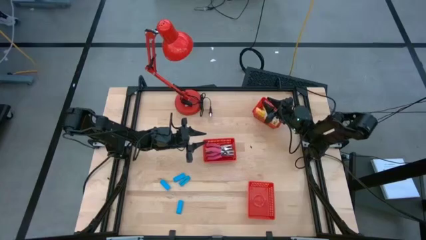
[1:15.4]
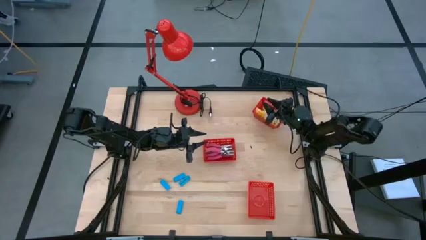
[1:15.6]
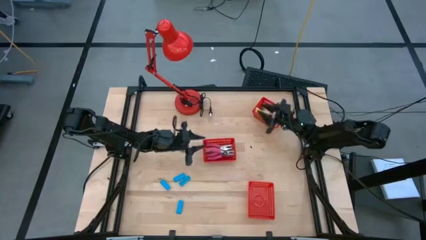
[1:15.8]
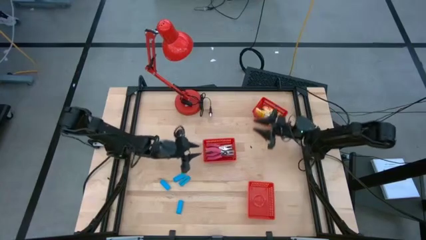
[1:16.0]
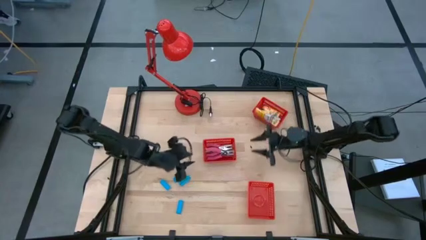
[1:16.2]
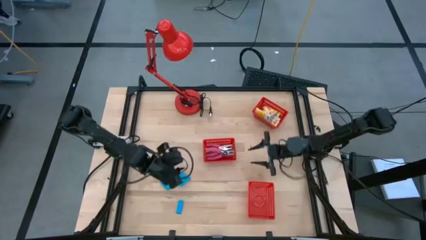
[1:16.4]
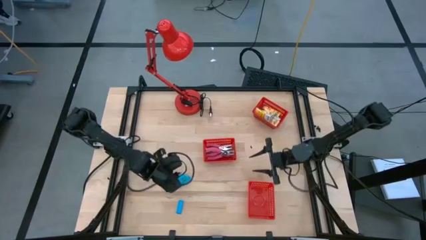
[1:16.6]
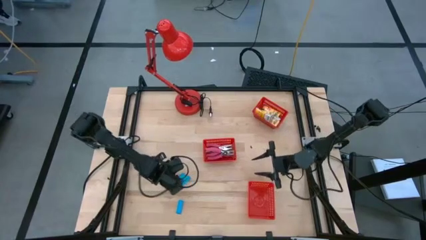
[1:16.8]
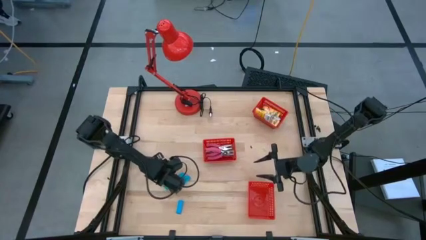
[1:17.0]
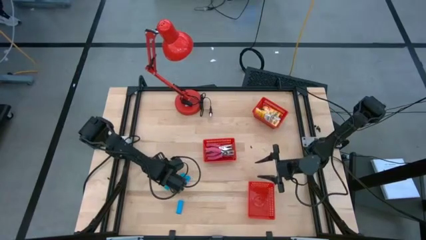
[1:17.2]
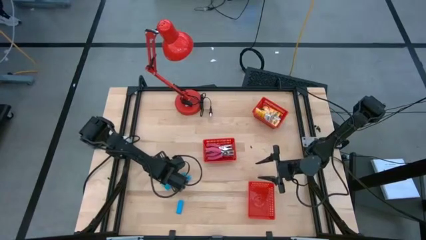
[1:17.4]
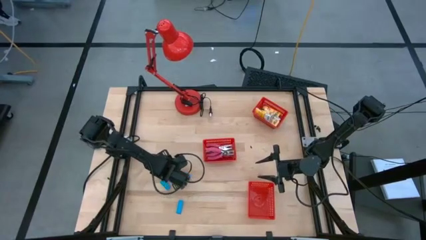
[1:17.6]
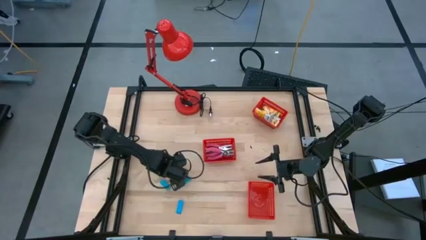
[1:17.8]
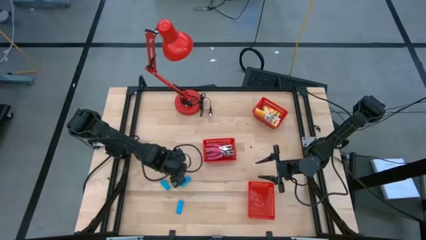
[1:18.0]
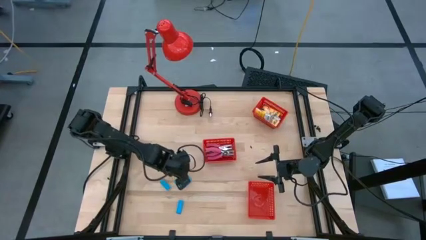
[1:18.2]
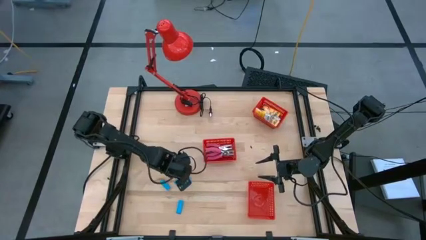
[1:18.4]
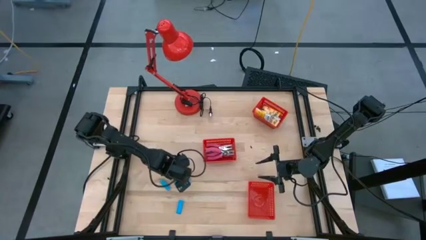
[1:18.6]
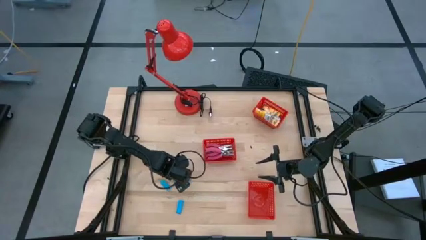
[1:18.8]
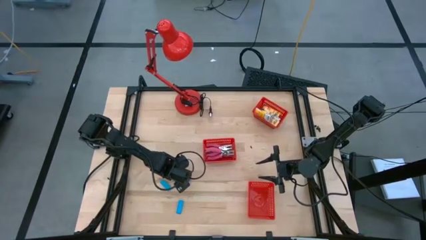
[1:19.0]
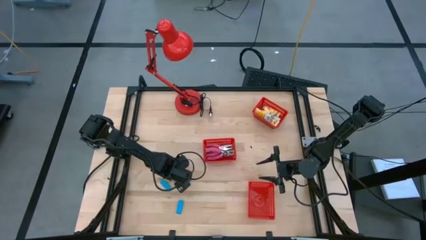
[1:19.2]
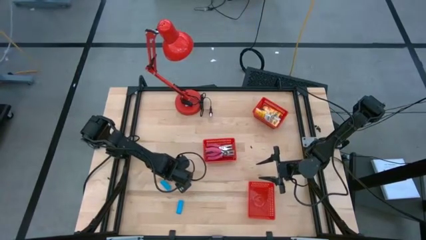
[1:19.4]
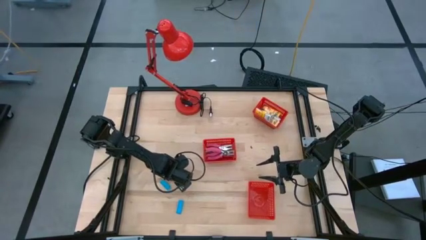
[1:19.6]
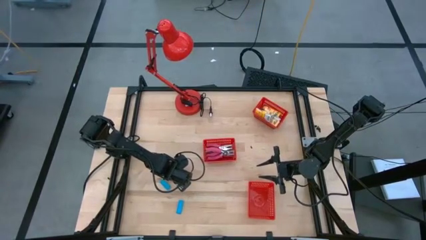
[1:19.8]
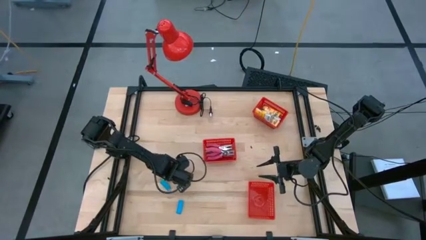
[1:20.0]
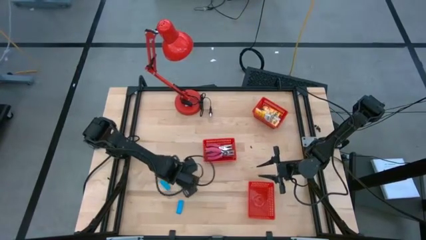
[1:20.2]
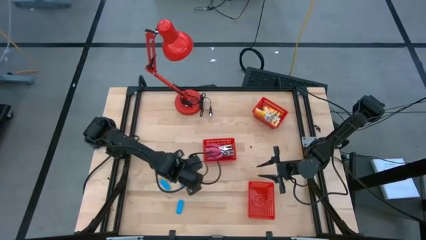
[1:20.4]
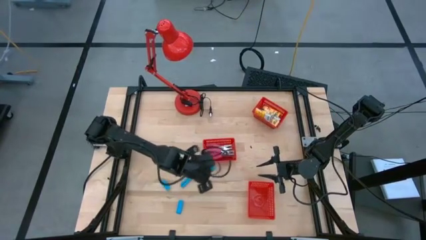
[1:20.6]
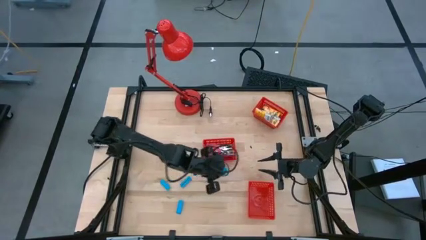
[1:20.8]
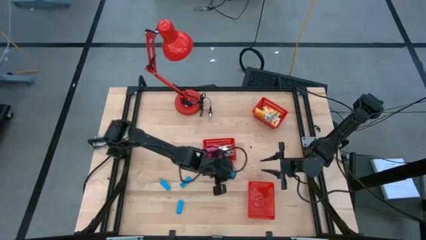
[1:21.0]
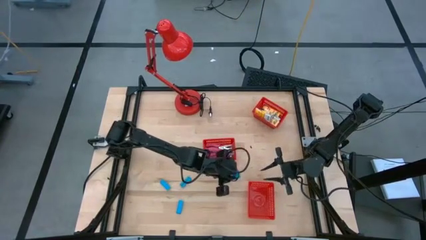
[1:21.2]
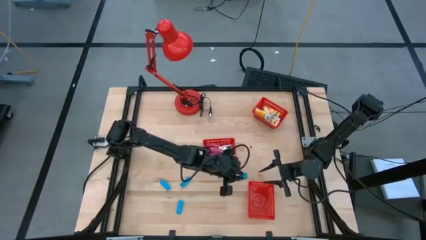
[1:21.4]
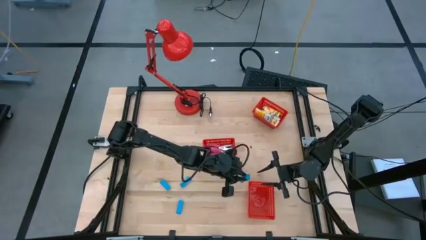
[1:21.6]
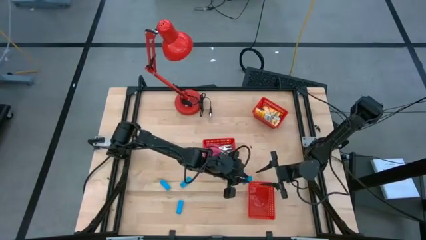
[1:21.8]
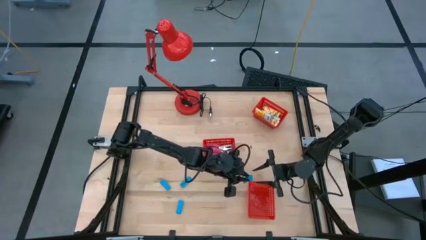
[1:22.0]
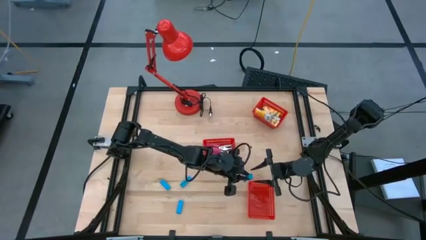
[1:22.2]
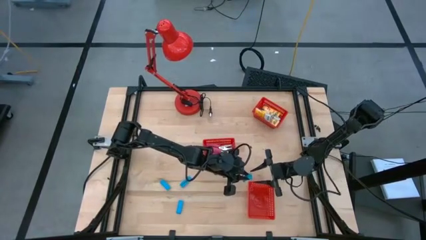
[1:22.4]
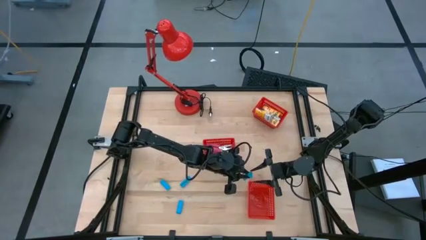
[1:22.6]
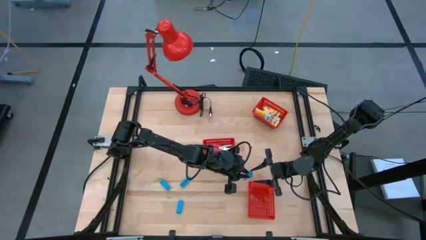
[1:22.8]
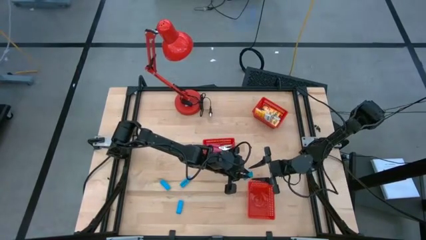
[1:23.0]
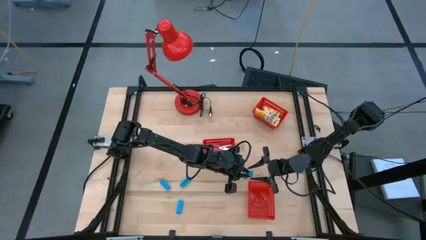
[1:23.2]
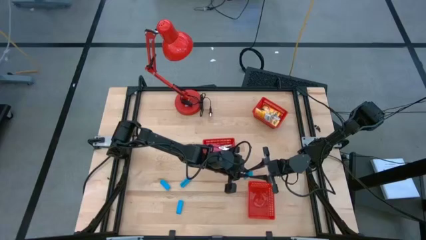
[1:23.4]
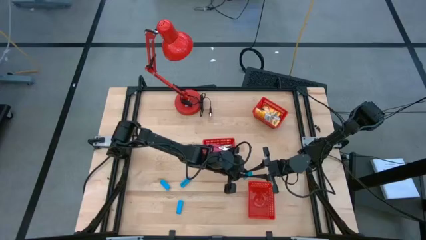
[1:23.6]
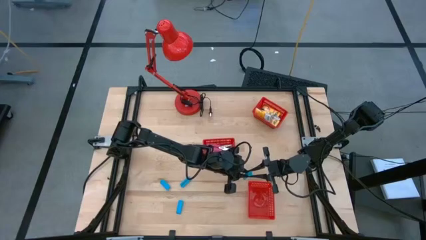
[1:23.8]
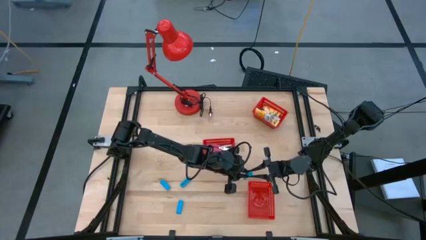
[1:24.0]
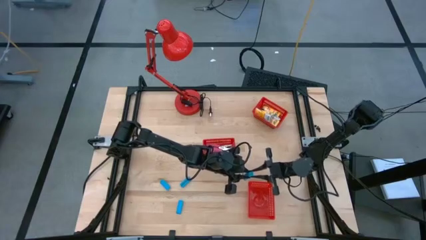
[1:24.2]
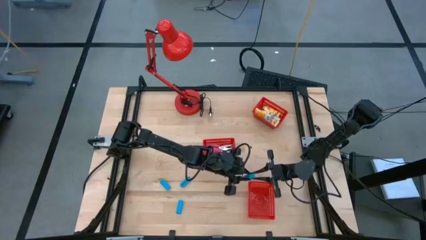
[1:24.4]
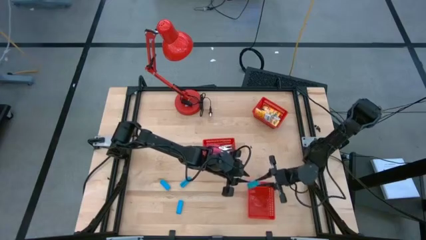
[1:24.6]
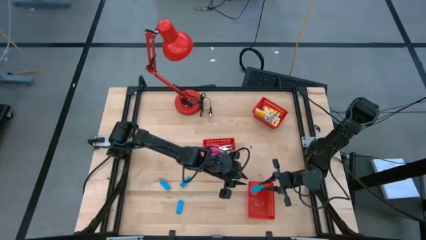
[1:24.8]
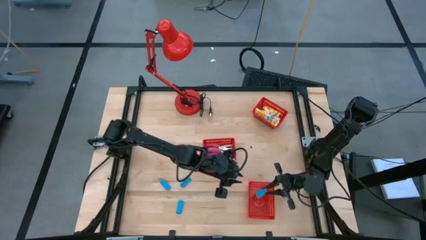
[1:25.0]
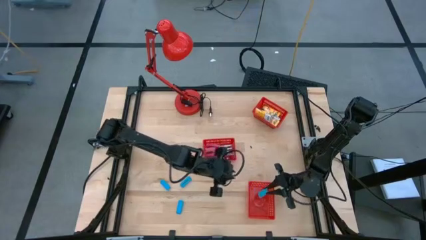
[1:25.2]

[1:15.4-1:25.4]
Task: Pick & Place School Supplies
Put the blue eraser into the bottom red bin

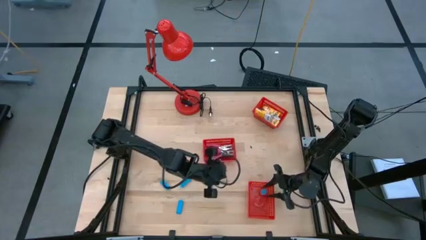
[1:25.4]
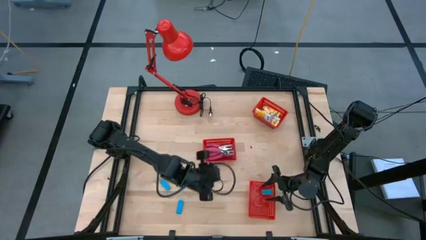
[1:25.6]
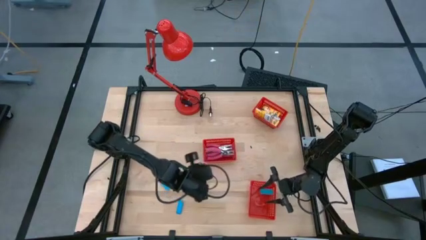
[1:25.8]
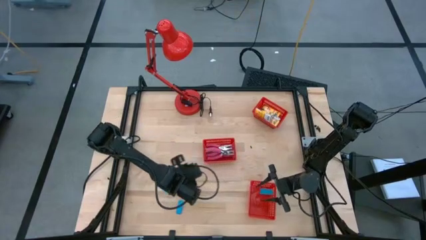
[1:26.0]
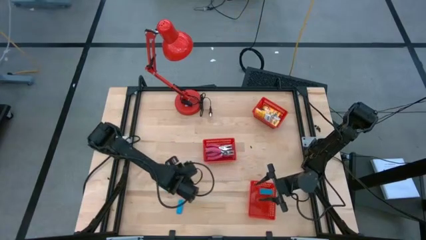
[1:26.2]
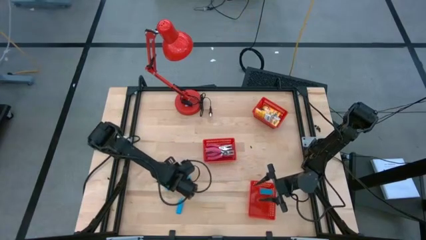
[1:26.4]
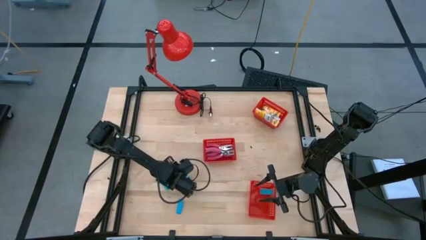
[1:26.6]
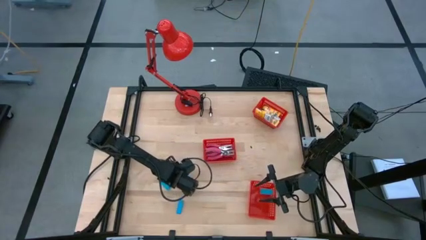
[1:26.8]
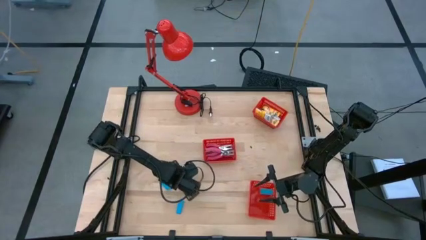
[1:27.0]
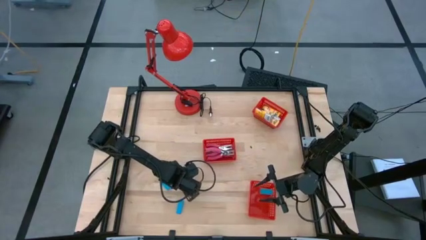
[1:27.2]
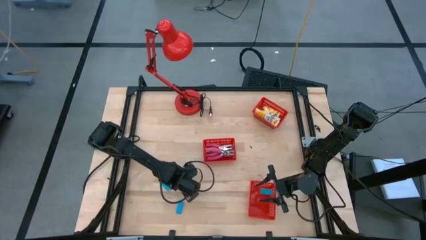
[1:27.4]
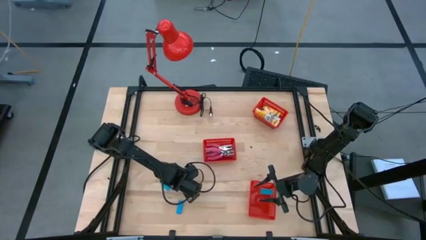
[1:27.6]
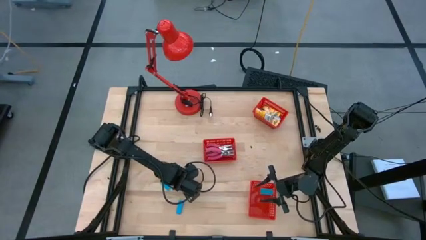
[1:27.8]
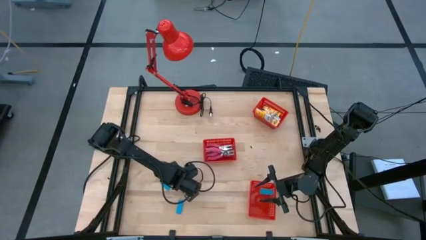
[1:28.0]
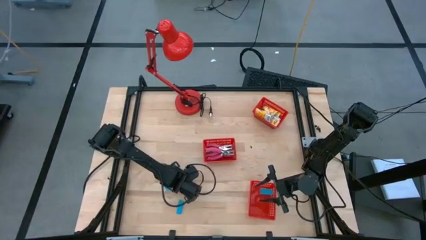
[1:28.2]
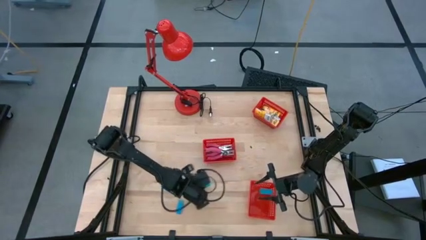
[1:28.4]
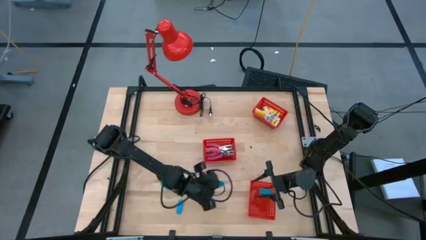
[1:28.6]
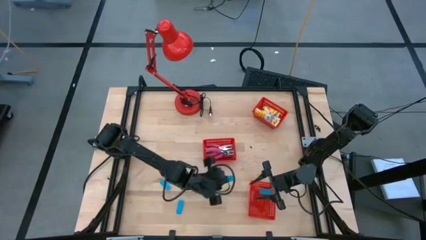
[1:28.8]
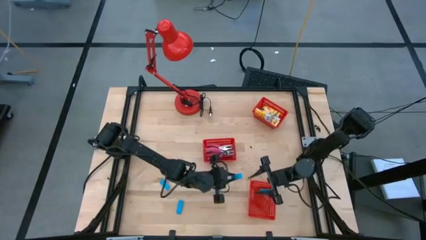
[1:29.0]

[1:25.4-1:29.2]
Put the blue eraser into the bottom red bin
